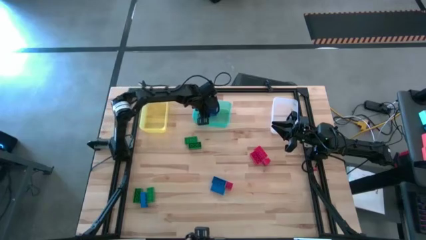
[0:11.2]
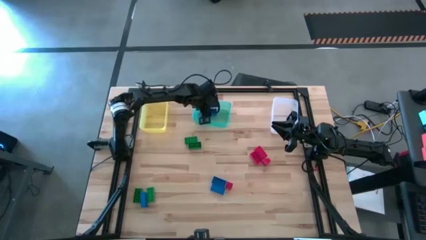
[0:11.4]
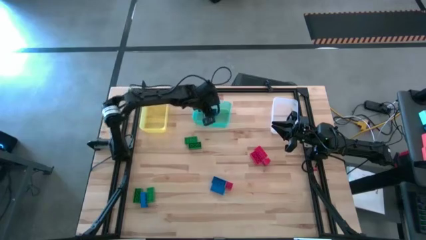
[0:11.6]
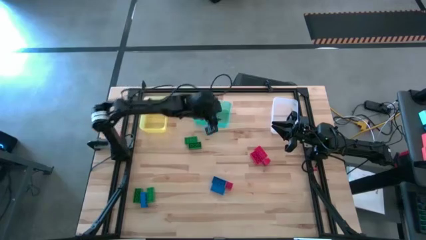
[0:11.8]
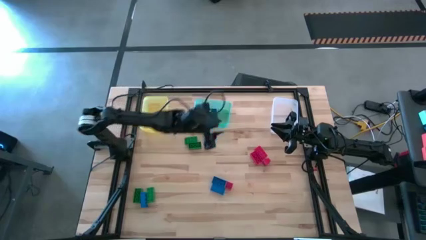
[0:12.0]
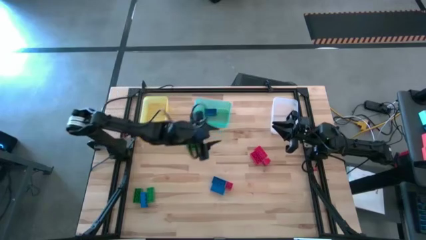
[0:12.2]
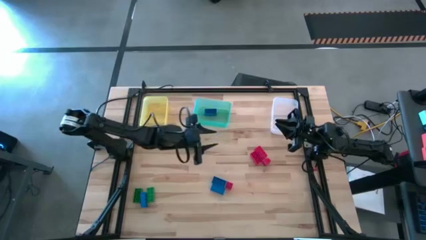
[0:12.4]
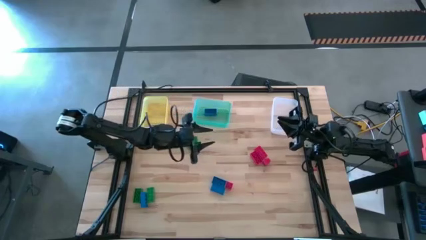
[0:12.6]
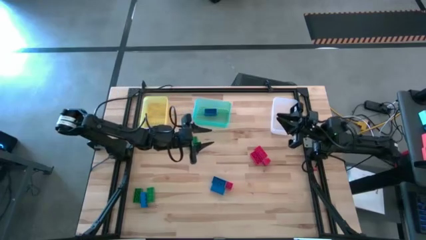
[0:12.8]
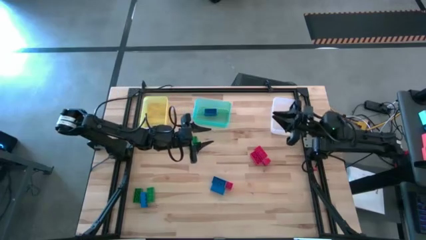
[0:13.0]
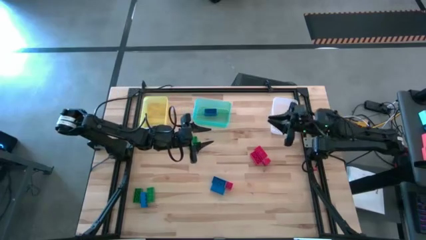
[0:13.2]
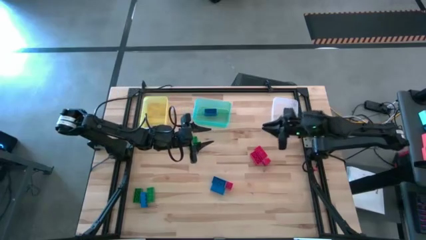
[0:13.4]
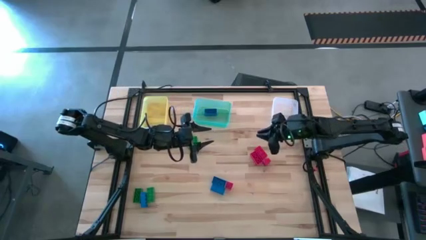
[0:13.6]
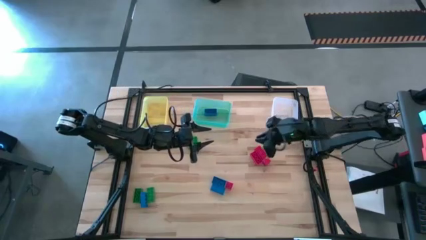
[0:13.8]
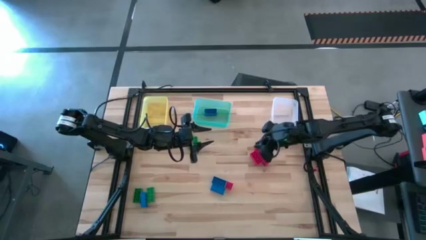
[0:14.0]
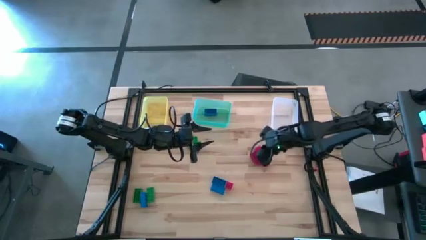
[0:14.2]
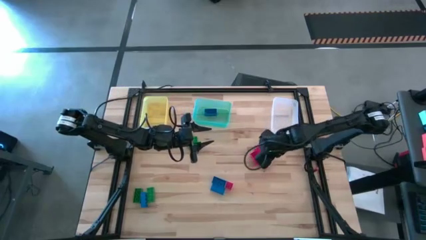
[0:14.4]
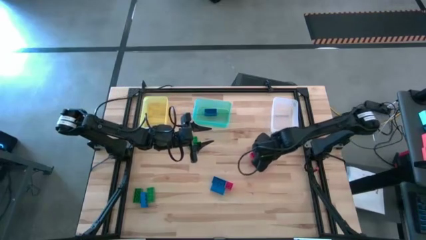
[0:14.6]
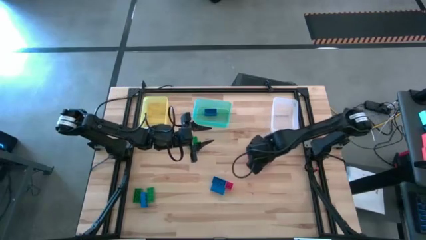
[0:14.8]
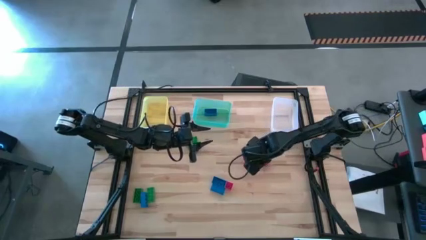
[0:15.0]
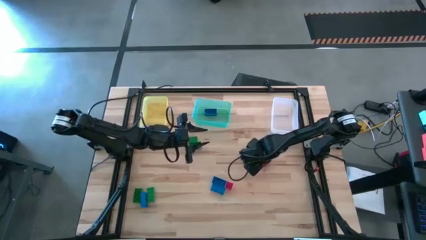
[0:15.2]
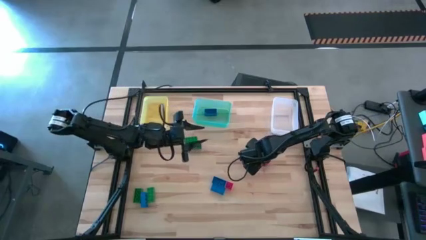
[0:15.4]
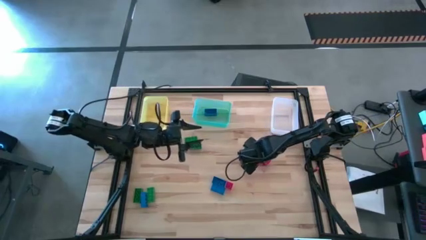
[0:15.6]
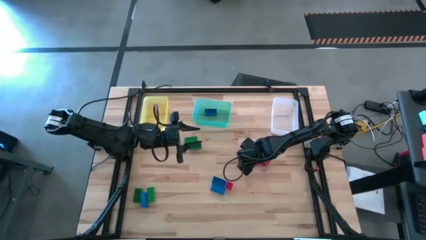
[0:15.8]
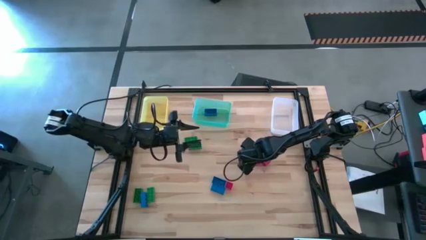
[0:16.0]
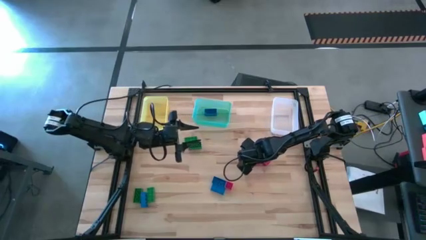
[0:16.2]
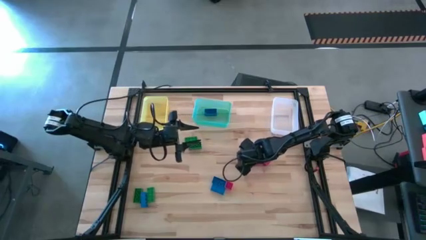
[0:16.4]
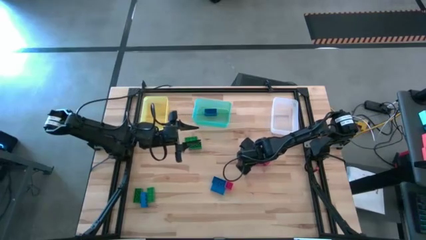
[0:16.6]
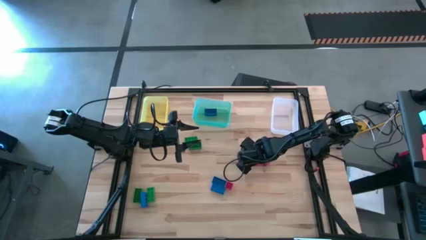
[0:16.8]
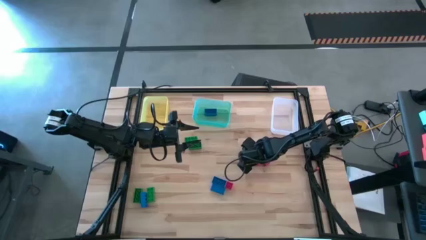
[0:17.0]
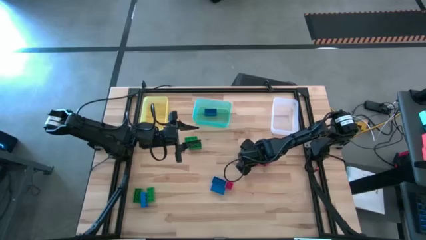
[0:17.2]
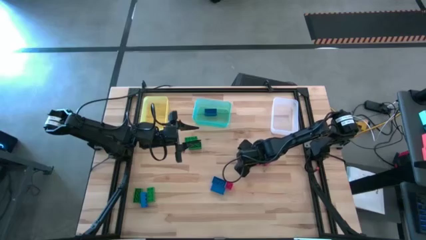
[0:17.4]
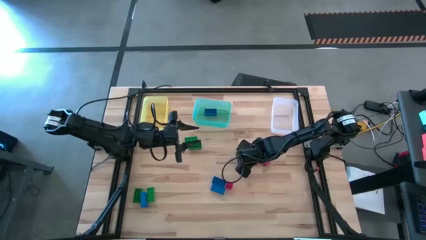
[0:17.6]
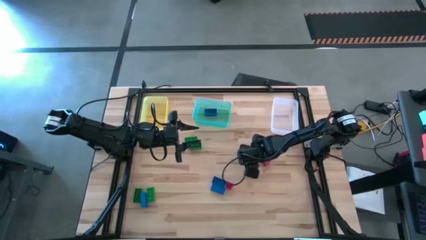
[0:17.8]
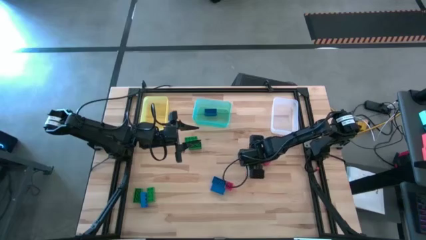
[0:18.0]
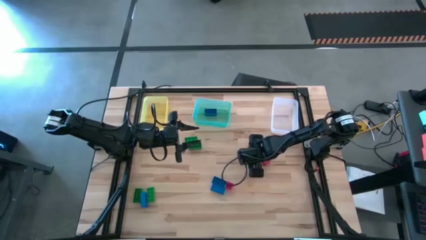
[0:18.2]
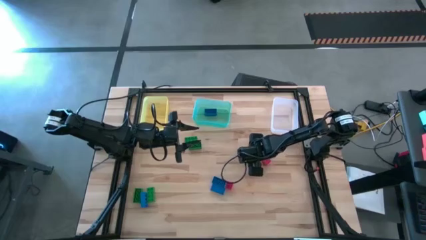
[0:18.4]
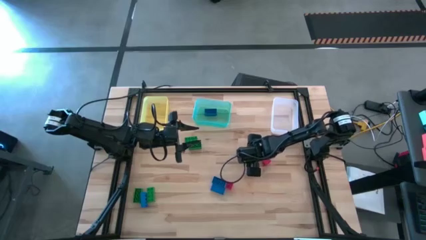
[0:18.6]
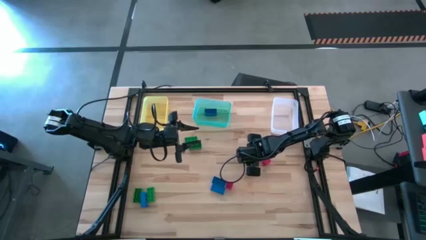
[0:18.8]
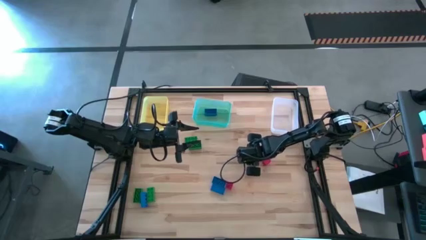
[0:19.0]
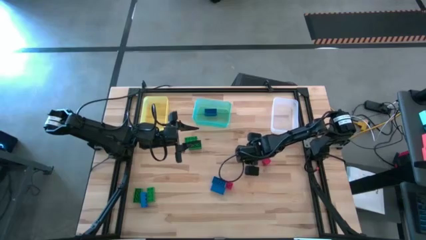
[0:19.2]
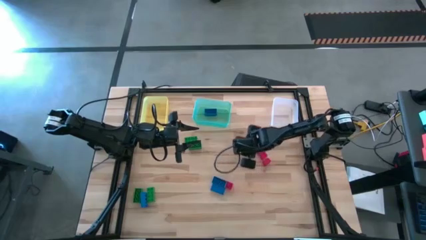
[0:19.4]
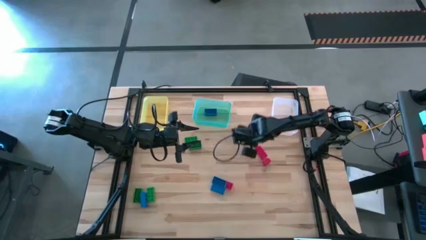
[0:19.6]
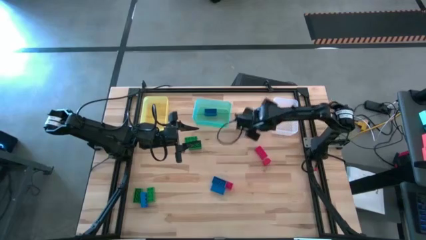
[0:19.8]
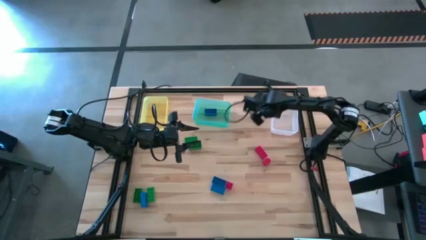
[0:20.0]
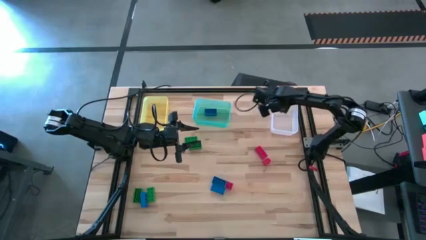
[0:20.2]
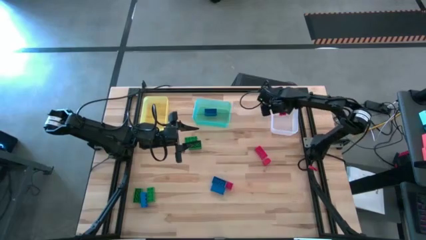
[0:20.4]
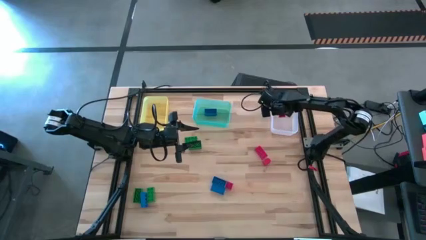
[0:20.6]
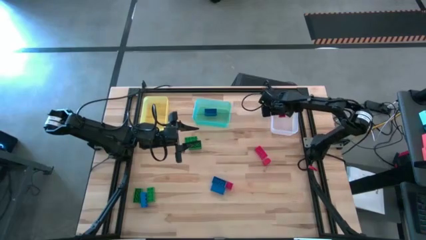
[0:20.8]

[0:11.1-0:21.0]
Task: Sort & place blocks by color
Put the red game piece into the transparent bin

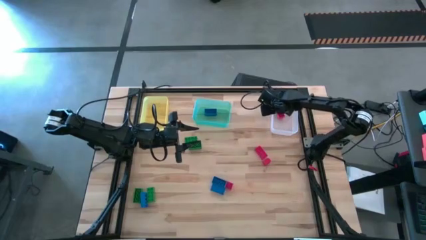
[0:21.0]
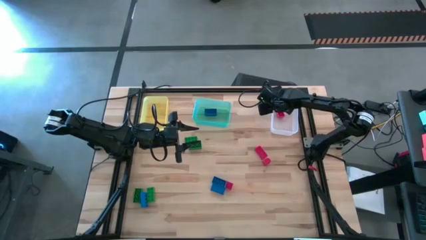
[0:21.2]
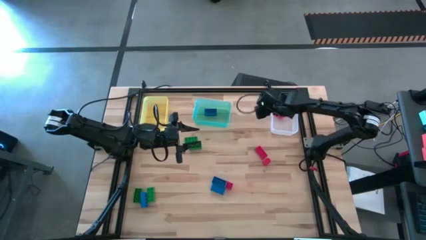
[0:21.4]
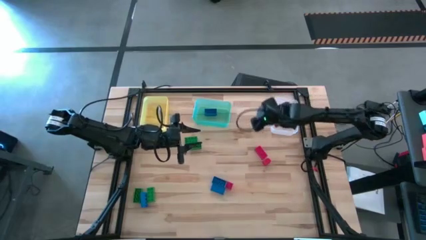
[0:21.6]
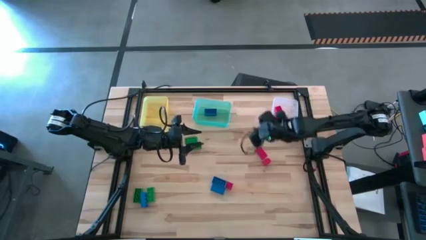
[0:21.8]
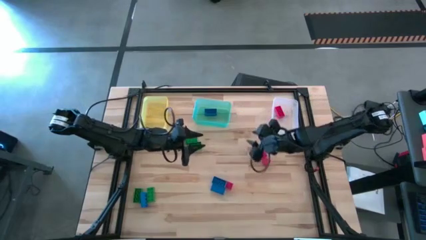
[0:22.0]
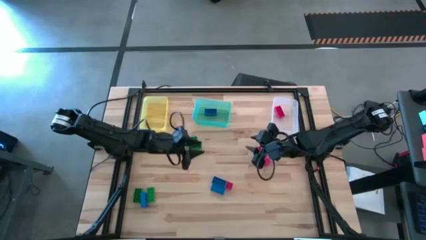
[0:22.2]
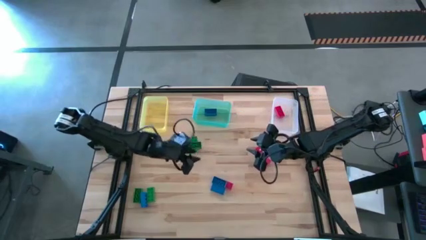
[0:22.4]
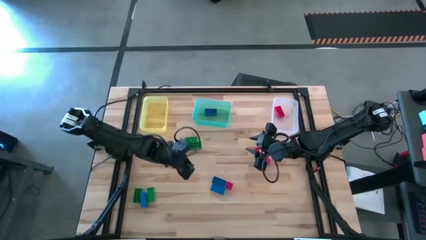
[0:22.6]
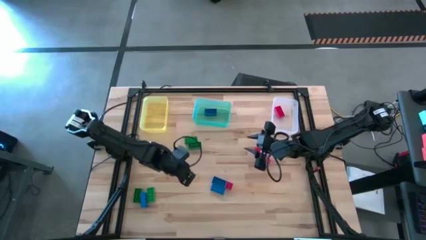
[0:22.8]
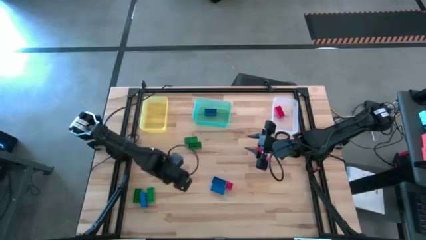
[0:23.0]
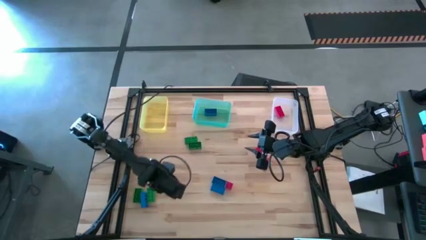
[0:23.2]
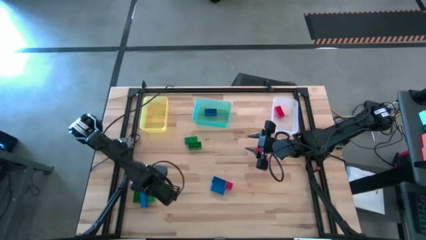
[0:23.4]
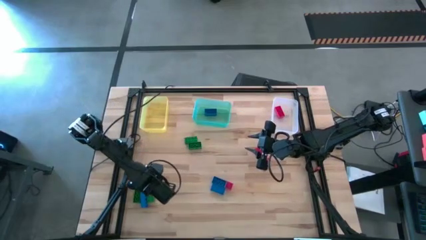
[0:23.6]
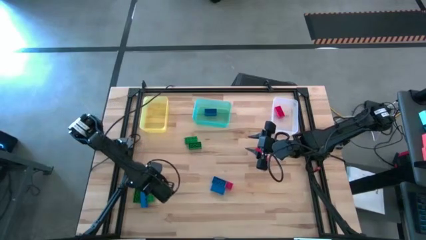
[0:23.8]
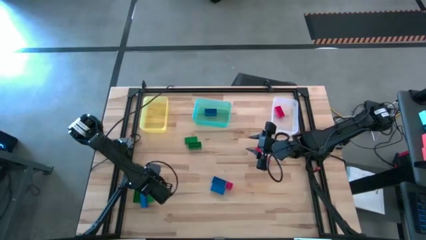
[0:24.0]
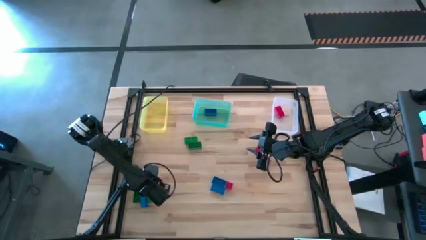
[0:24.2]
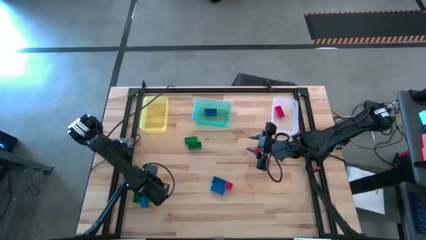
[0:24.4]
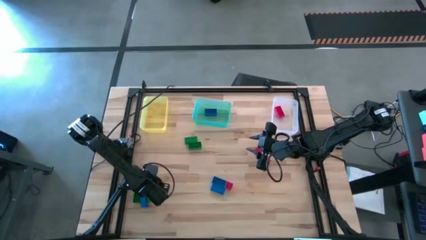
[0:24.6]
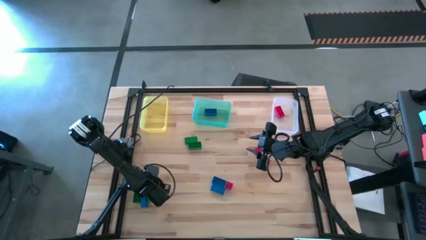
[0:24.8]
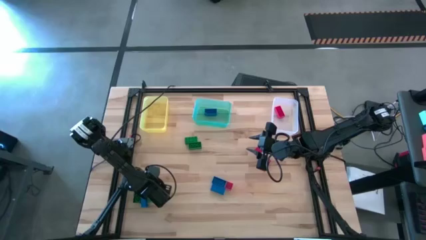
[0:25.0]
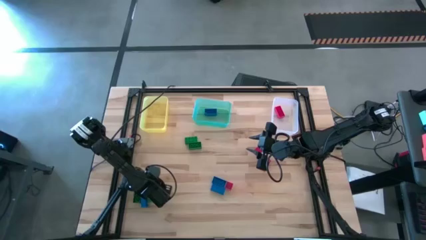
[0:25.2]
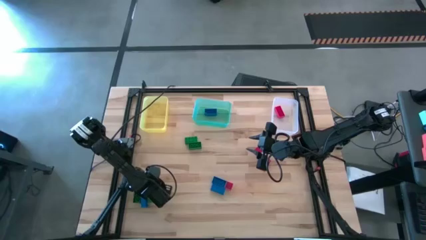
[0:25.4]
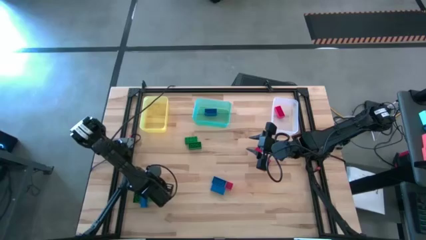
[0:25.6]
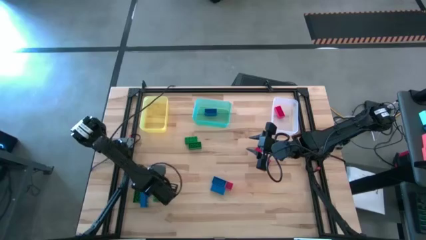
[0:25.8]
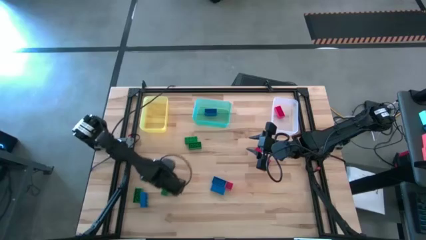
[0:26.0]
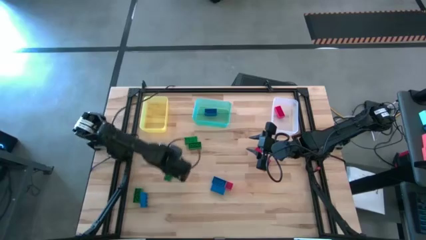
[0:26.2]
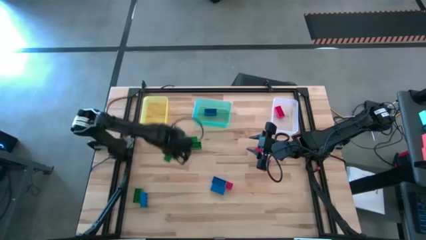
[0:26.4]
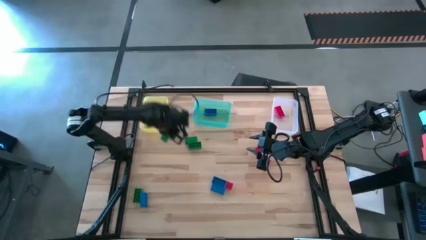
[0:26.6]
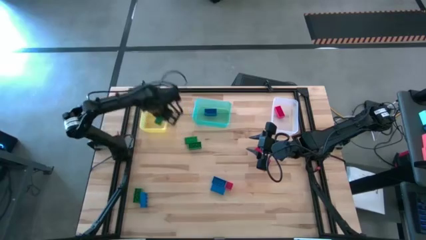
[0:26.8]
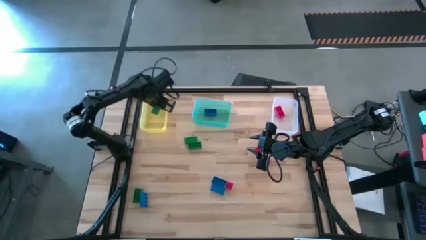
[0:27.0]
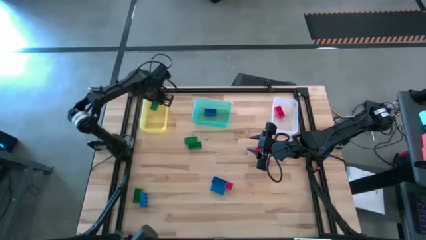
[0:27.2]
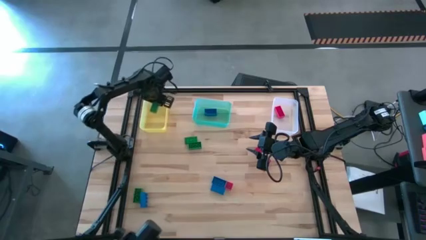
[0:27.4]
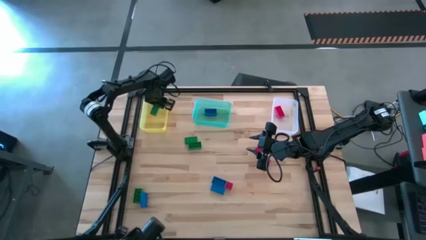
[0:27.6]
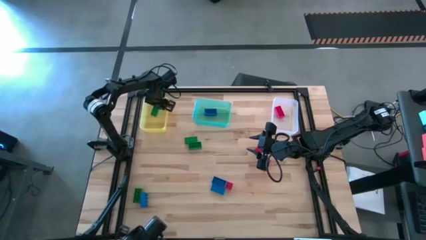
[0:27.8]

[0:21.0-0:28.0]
Put the green game piece into the yellow bin
